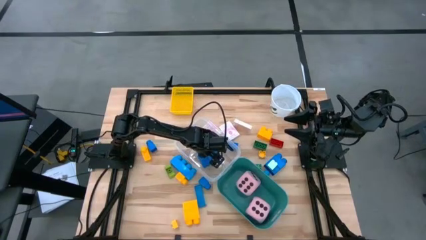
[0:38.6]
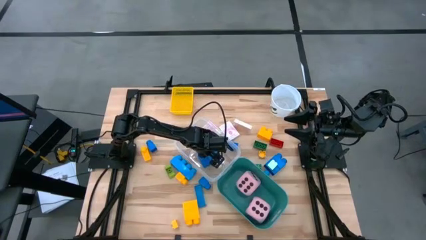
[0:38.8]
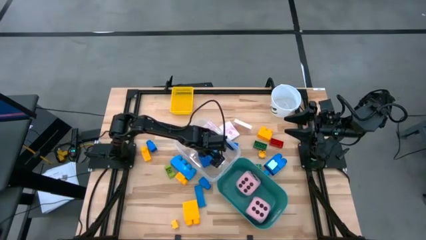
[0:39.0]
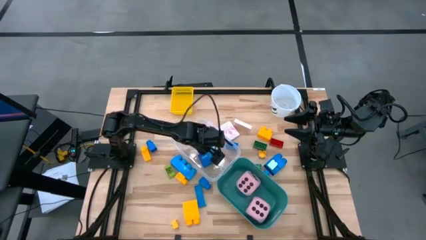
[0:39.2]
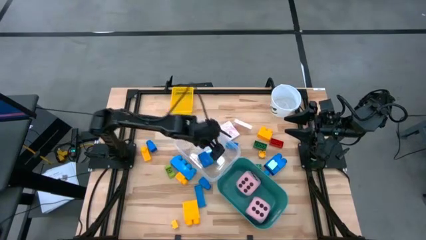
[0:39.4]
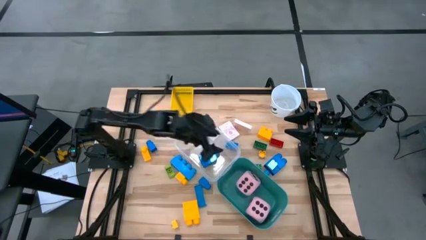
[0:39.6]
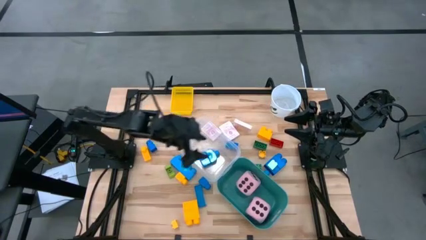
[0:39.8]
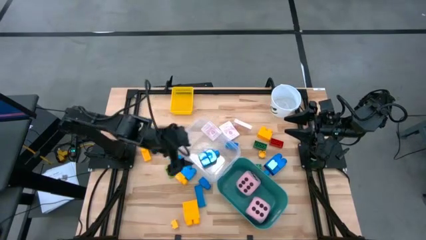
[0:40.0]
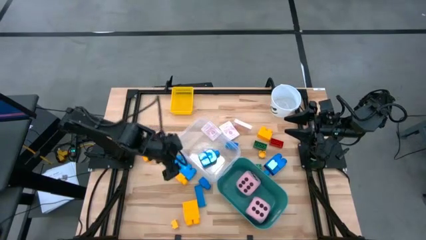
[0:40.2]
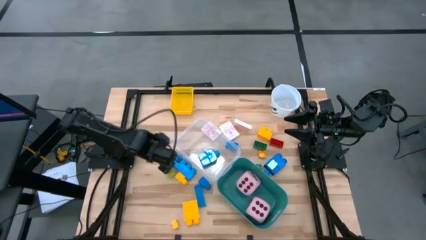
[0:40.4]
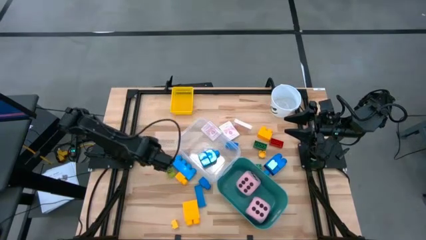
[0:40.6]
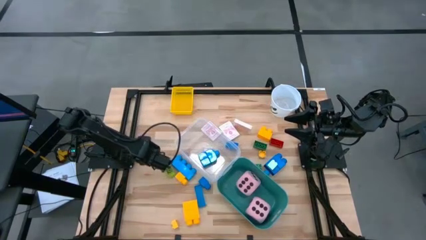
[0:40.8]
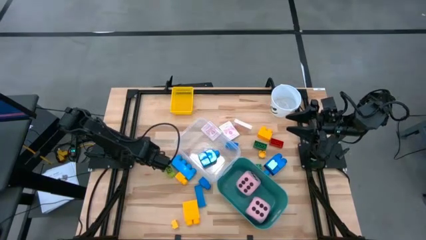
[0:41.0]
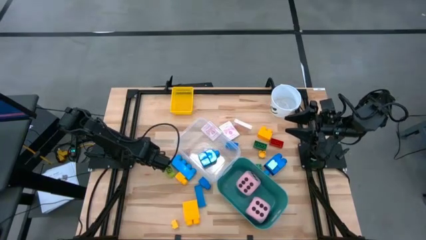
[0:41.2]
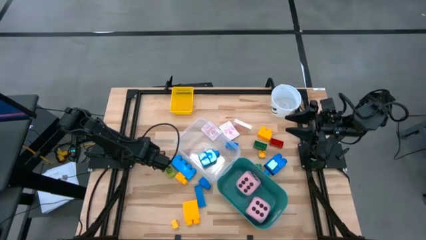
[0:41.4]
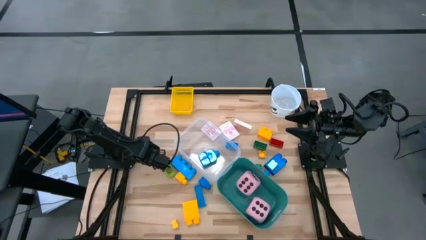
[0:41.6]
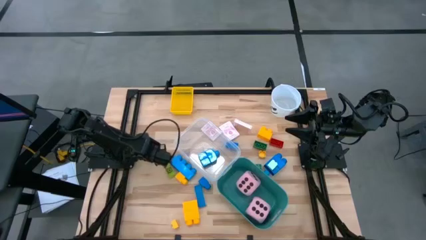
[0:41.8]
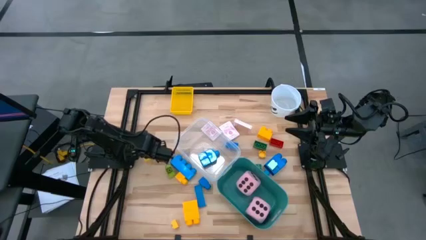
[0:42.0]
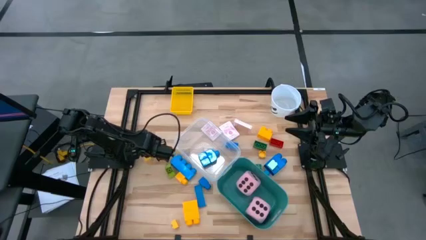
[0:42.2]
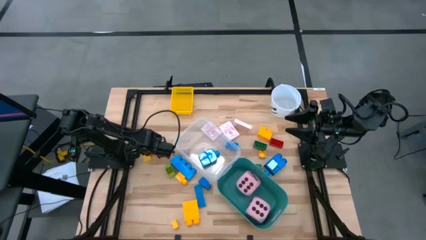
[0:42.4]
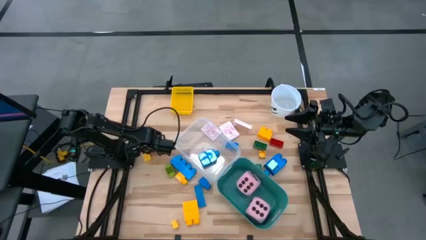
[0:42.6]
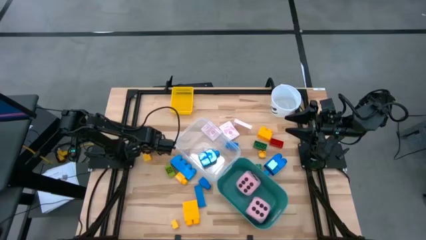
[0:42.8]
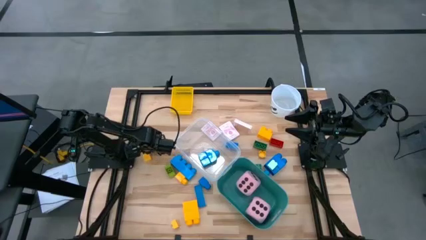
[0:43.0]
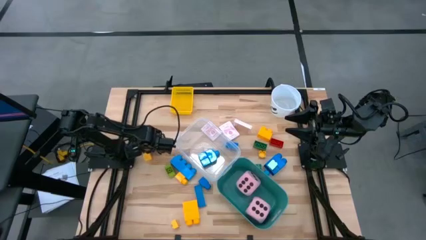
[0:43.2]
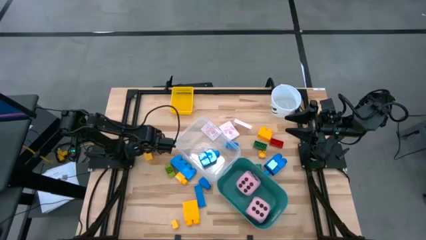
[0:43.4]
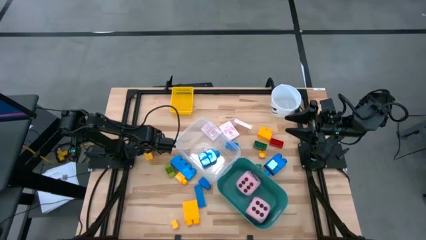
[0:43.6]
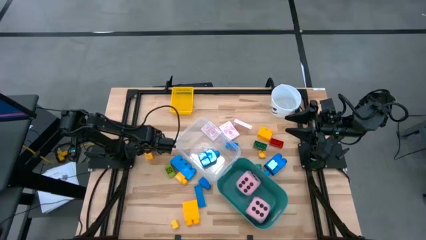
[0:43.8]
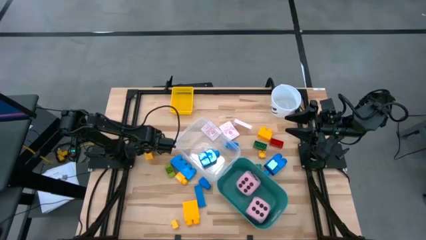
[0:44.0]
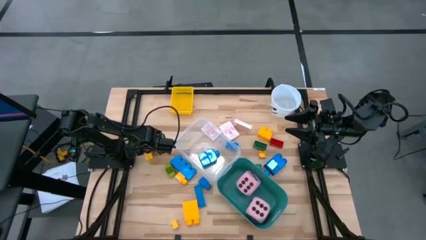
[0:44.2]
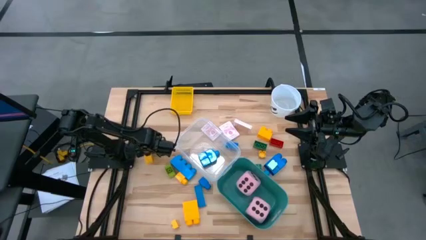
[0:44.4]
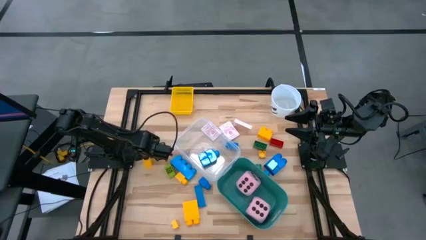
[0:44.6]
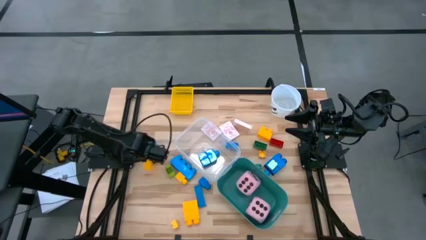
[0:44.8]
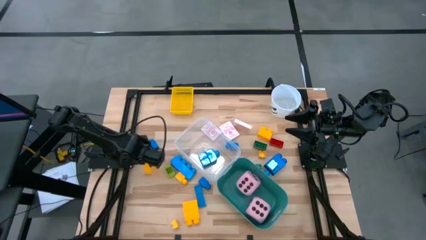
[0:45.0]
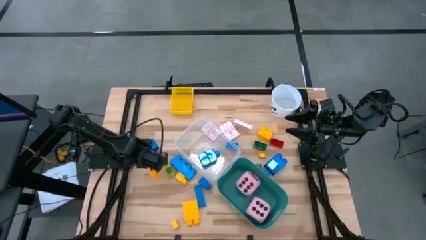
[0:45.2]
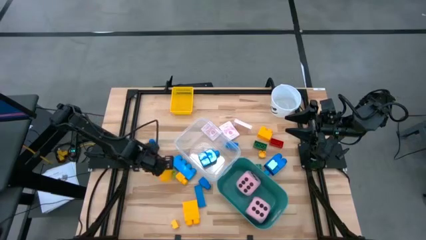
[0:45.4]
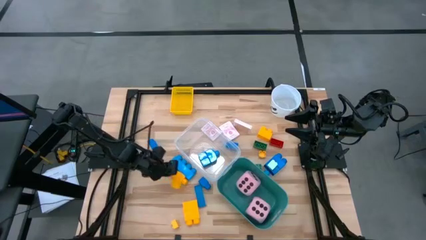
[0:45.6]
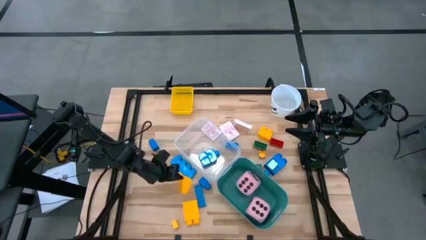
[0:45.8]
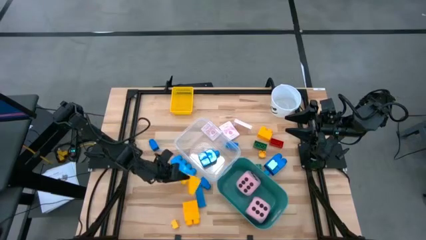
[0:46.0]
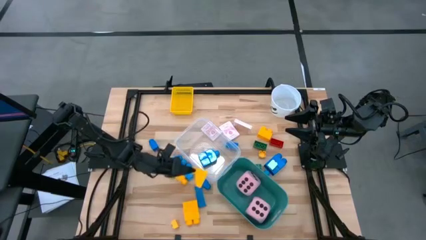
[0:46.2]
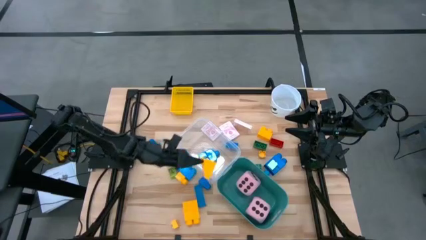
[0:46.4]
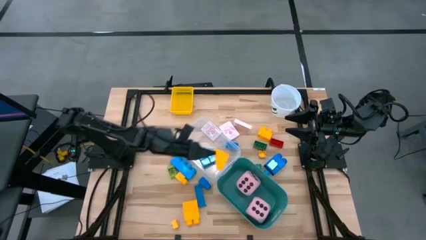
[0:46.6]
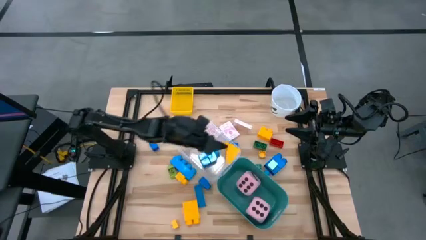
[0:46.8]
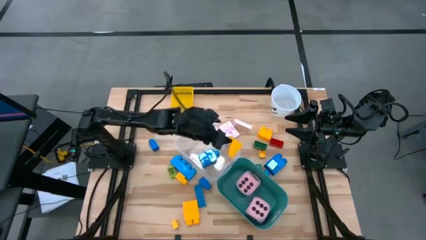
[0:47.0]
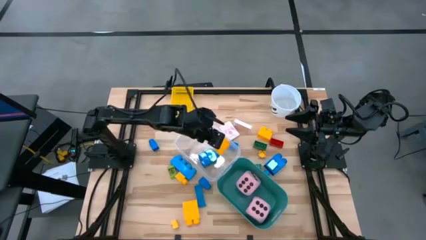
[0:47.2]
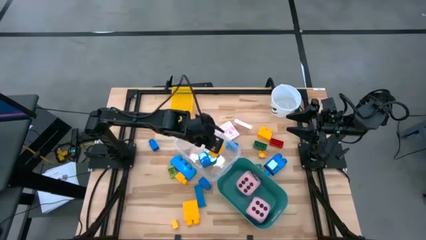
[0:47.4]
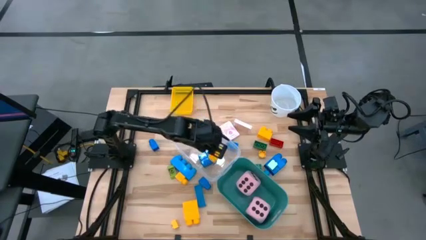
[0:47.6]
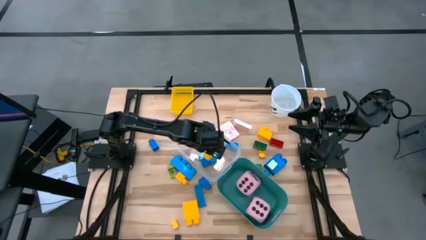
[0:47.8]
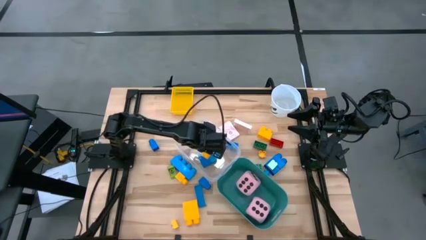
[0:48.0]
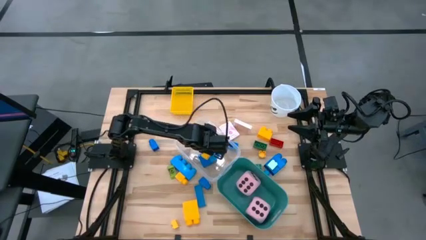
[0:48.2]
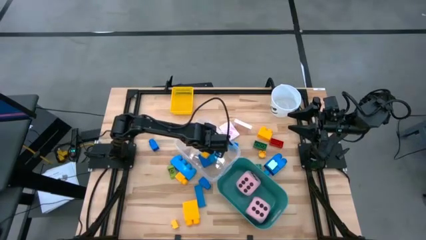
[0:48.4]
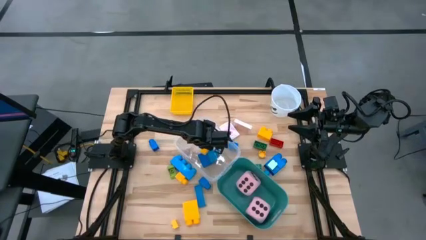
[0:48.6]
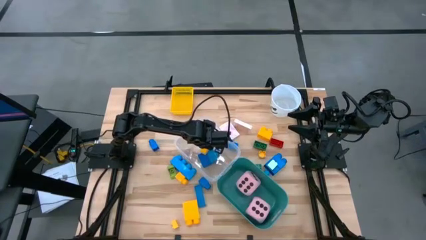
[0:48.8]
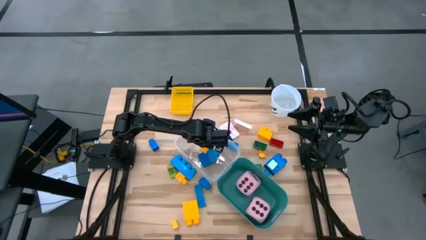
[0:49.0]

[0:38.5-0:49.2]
Task: Pick & Place Toys
Put the yellow game piece into the transparent bin
